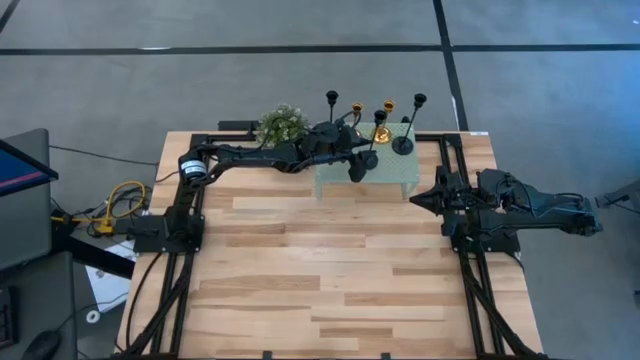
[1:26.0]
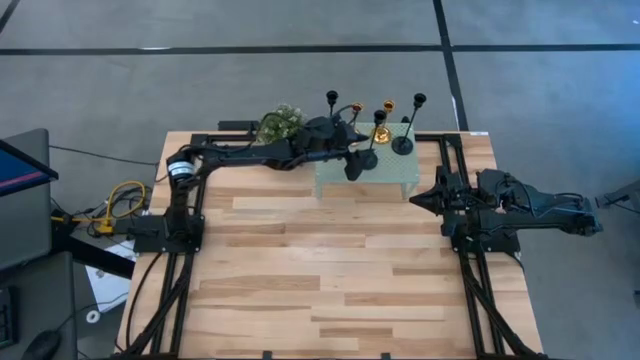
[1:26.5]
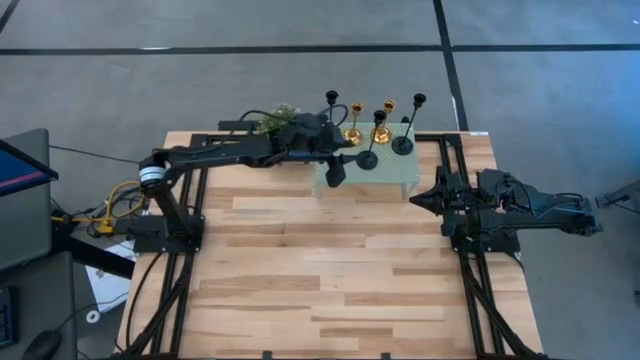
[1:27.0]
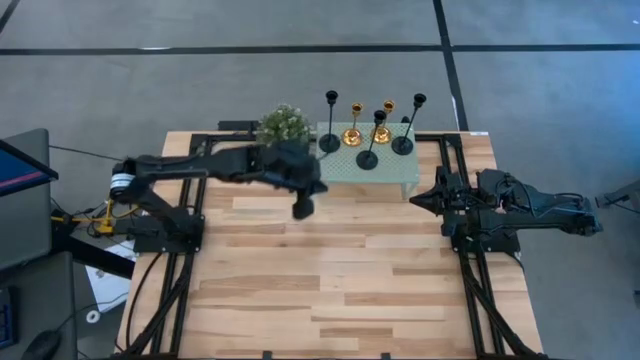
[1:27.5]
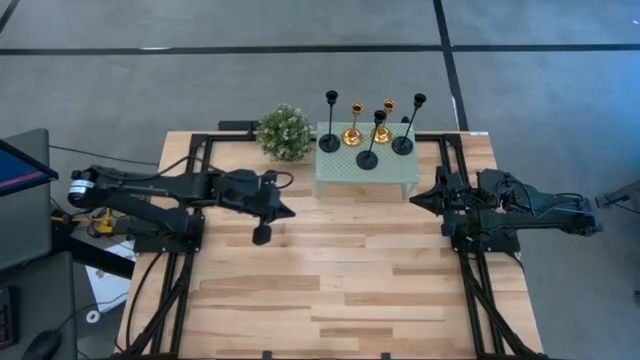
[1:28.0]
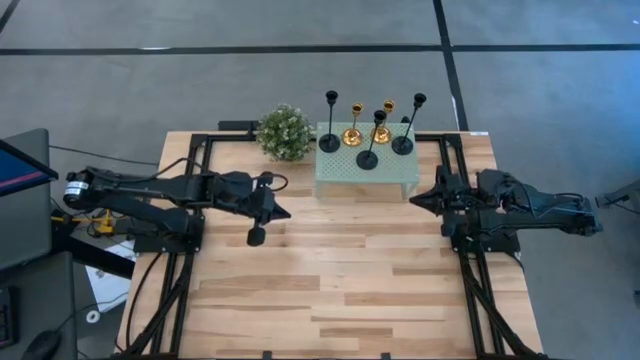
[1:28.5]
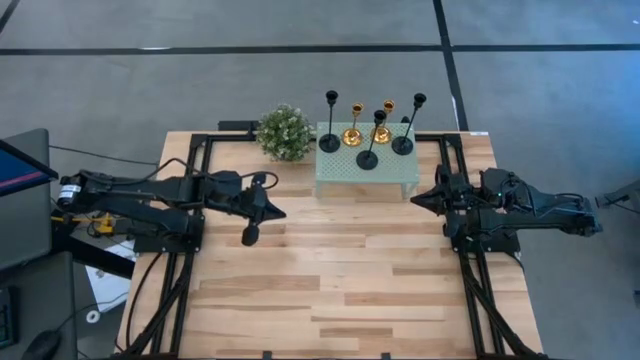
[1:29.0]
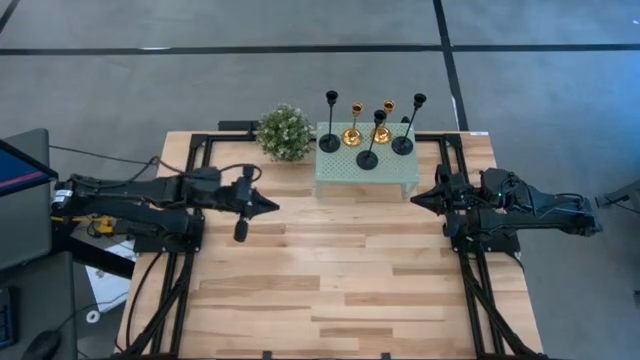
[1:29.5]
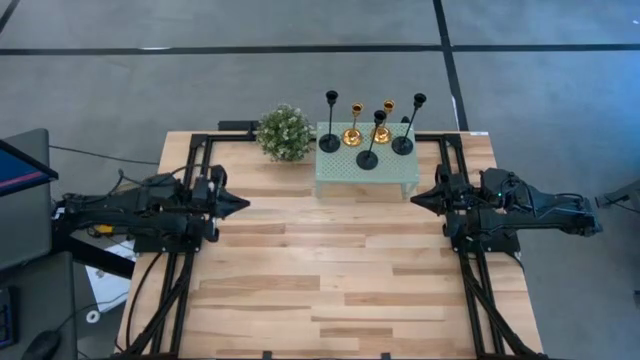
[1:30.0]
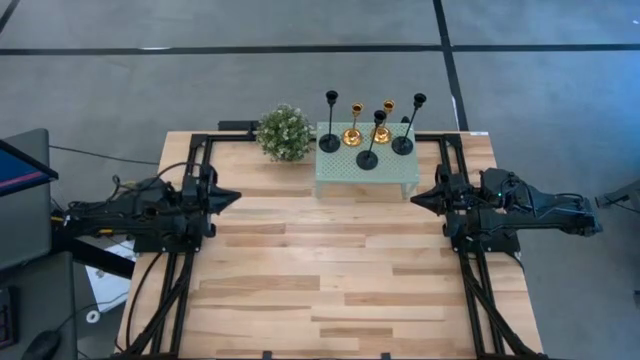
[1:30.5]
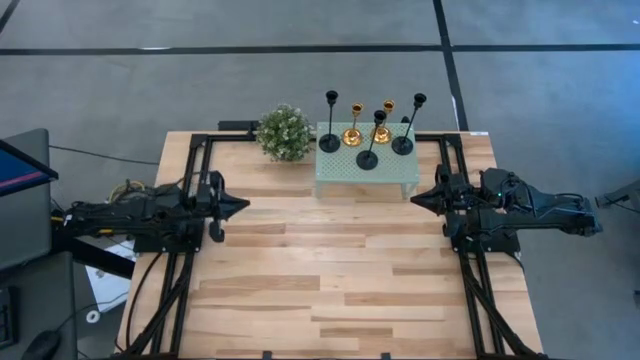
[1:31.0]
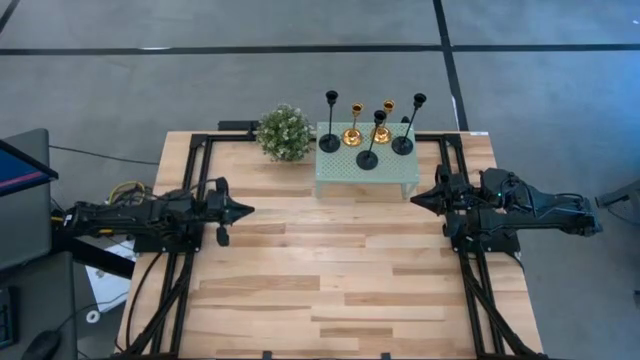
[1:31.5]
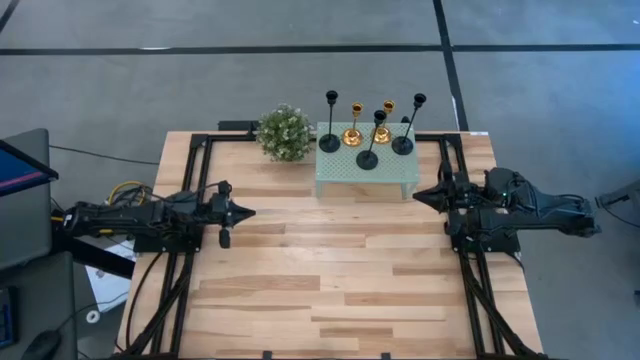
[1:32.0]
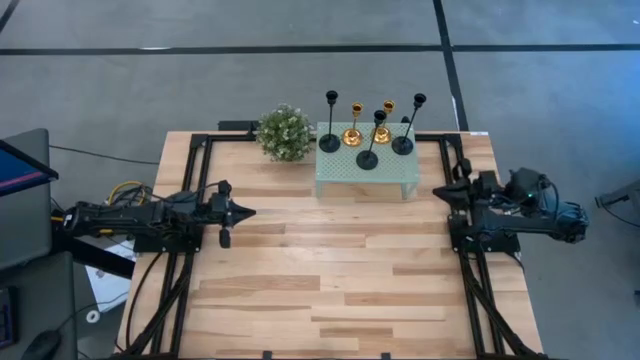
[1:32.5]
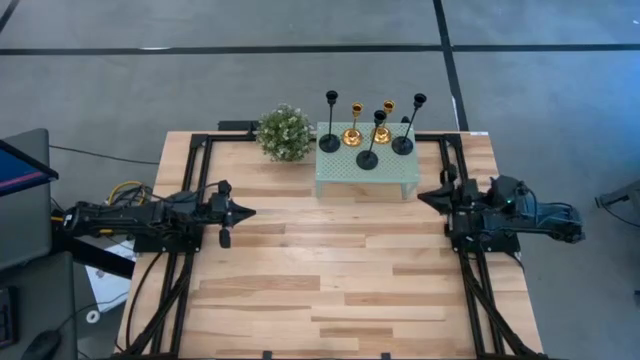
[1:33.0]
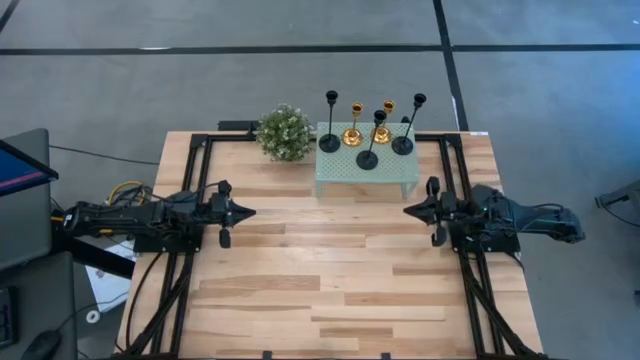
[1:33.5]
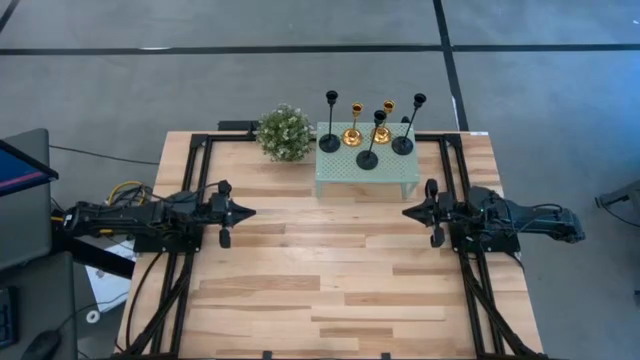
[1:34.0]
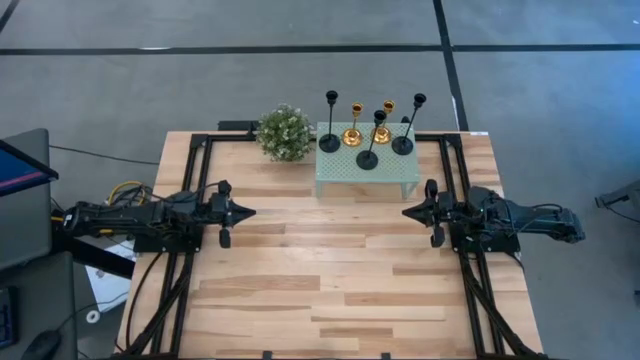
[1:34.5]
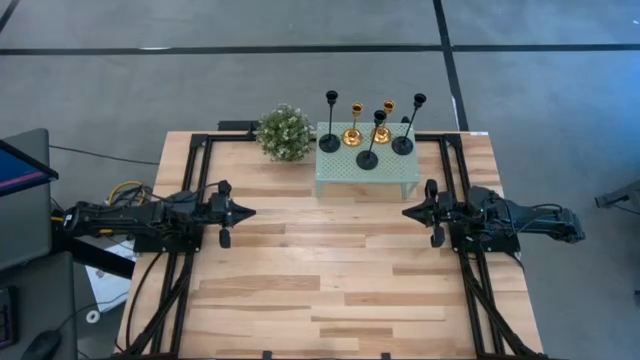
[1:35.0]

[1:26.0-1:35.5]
Task: Pick & Place candle stick holders
Return to Home Position

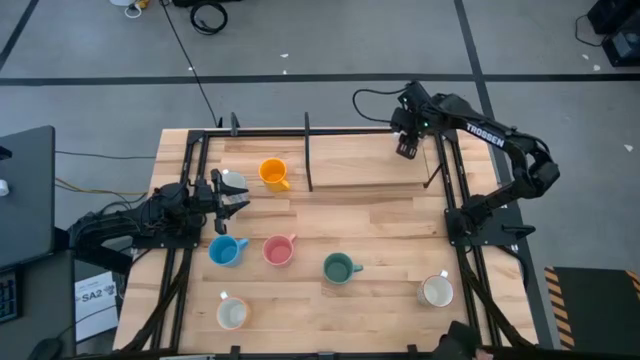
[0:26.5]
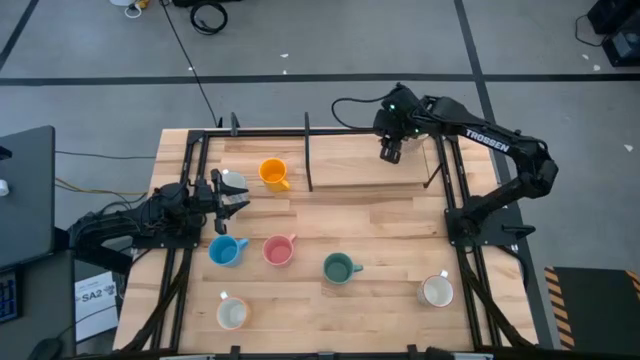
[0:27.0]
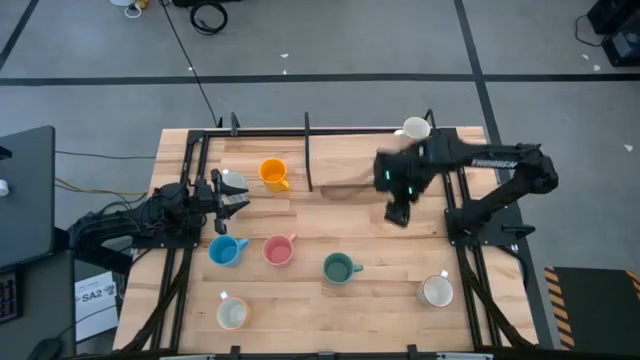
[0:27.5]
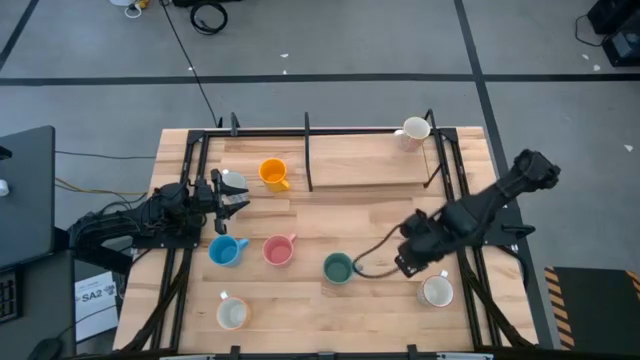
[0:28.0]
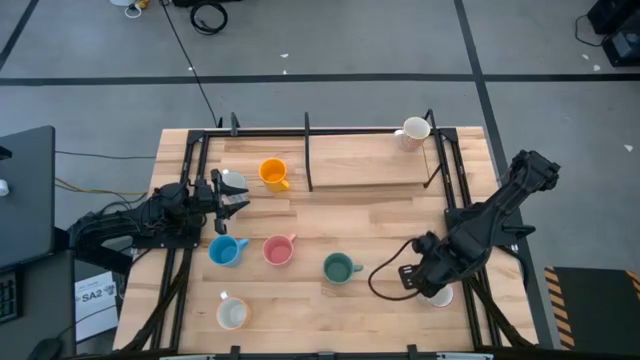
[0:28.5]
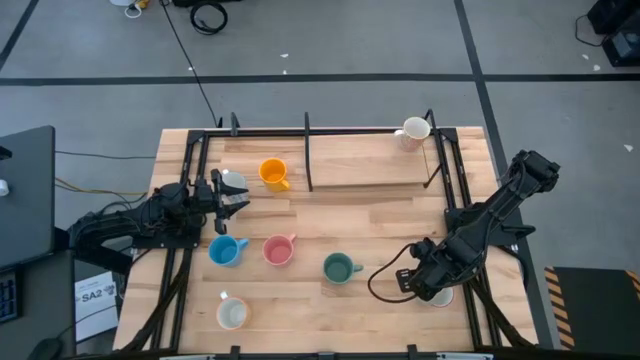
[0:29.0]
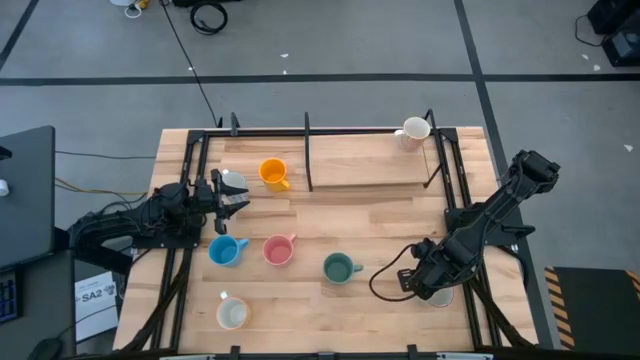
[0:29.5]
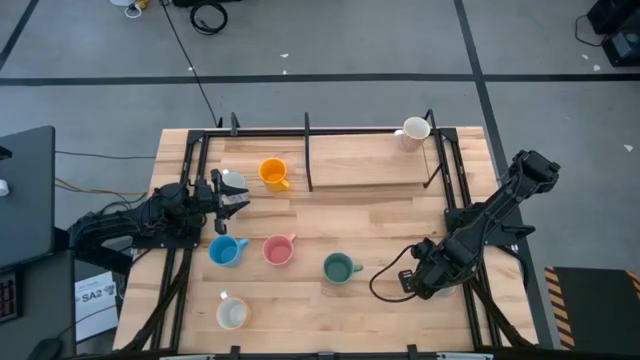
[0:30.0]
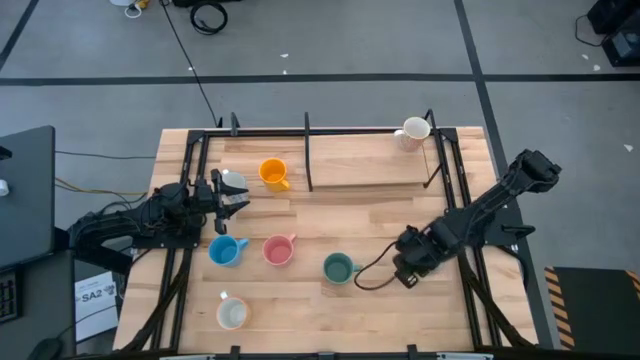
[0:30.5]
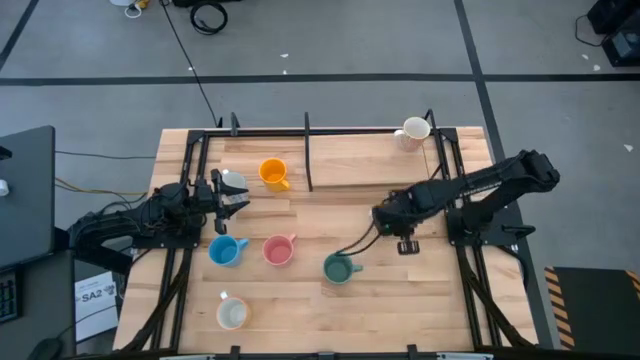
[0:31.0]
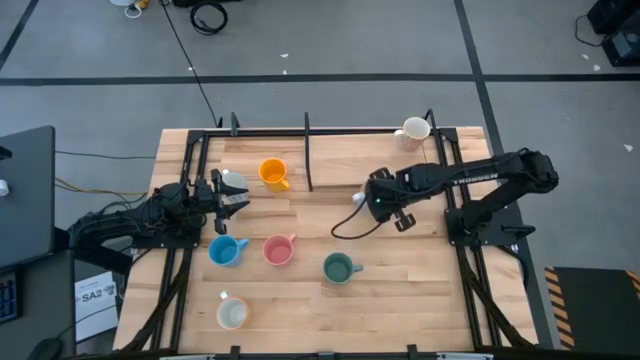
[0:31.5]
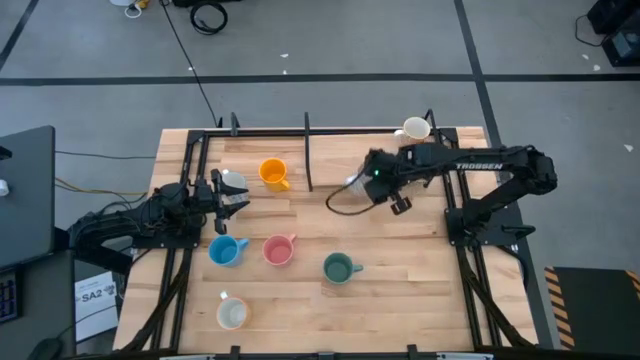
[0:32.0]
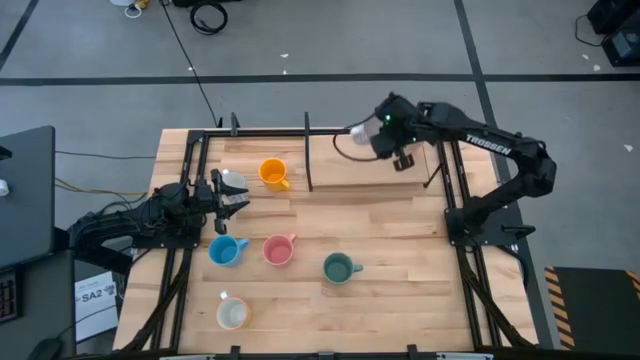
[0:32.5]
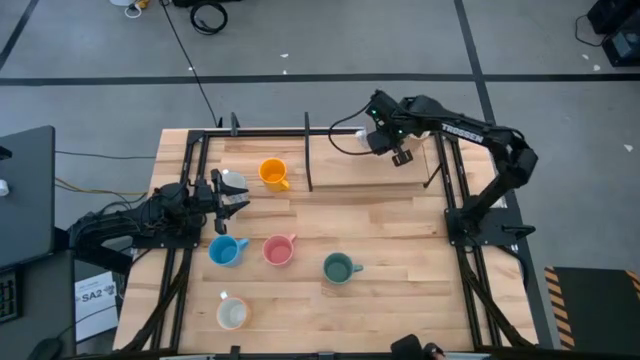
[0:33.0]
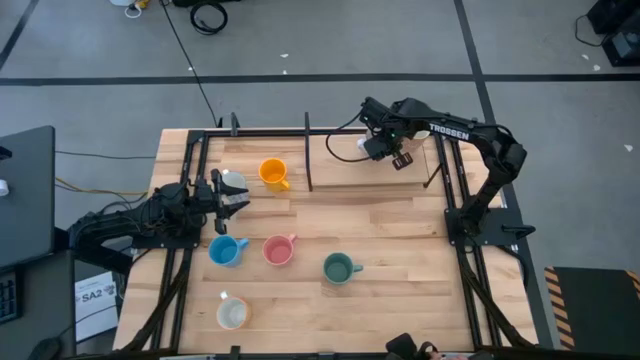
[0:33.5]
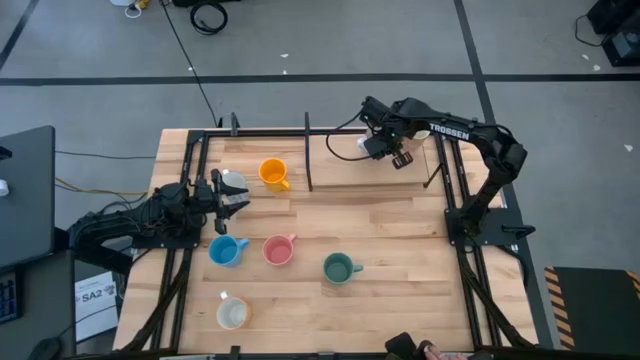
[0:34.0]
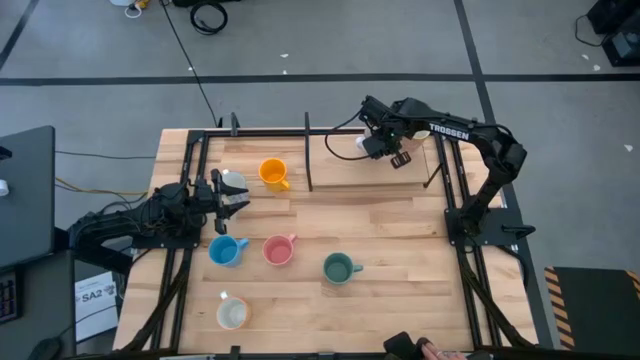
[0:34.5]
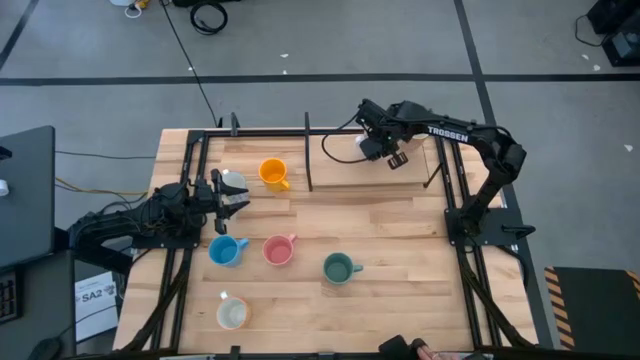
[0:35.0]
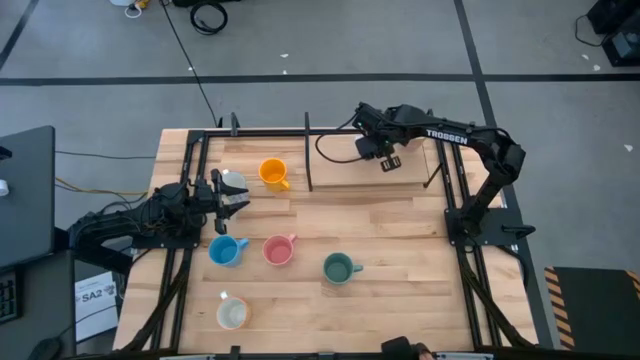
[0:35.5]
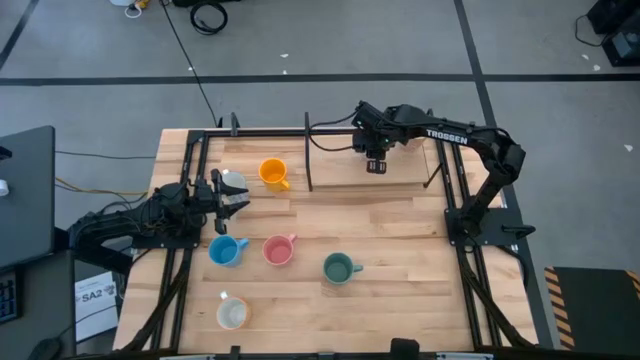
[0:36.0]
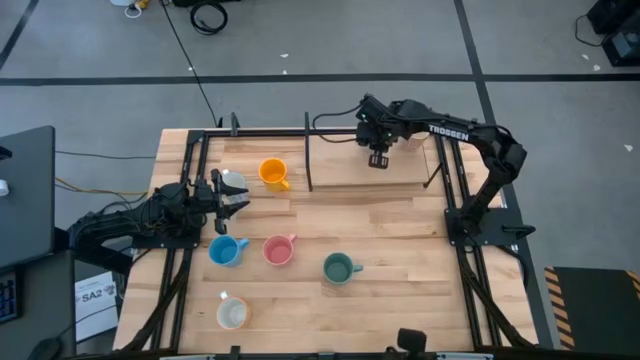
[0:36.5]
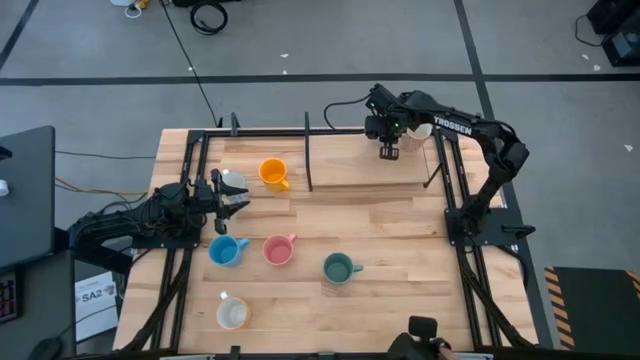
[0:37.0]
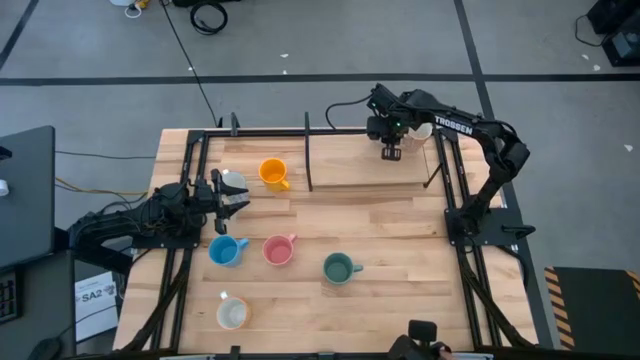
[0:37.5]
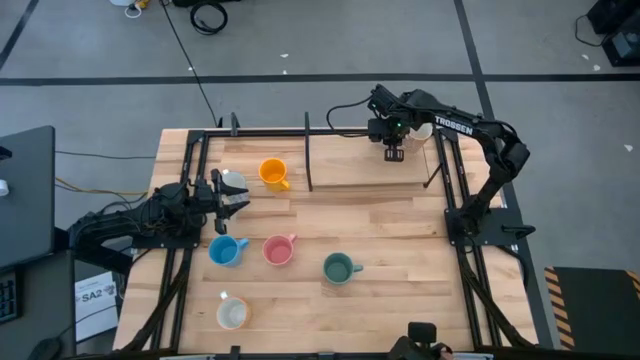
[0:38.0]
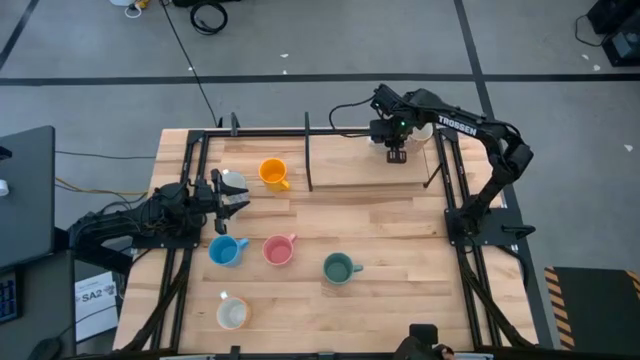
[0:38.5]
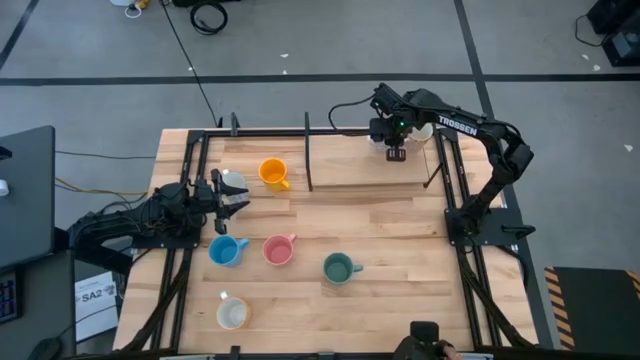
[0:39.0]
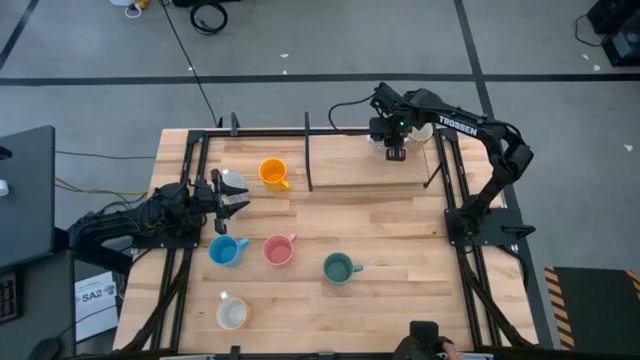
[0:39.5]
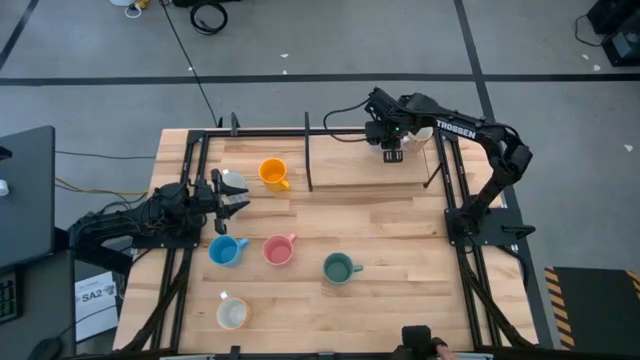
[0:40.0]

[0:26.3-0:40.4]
Task: Place coffee mugs
Put the gray and white patterned mug on the shelf
